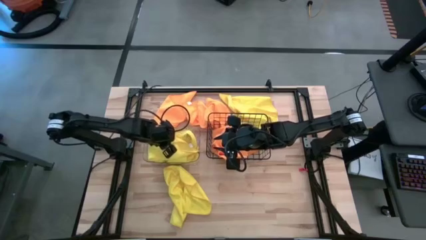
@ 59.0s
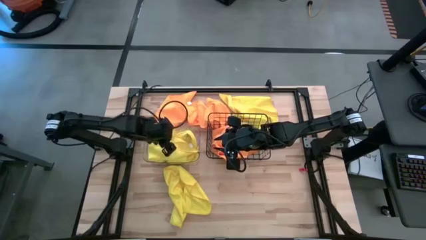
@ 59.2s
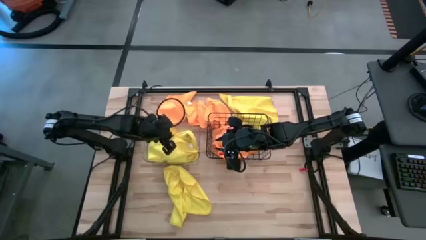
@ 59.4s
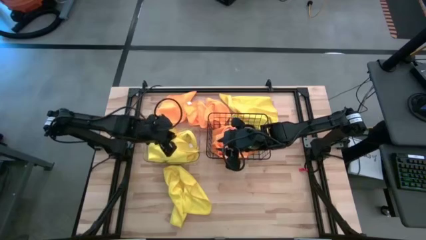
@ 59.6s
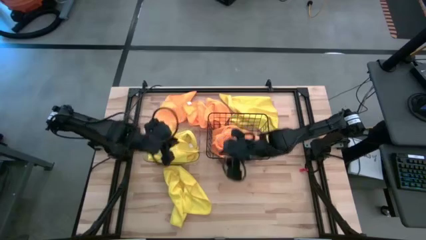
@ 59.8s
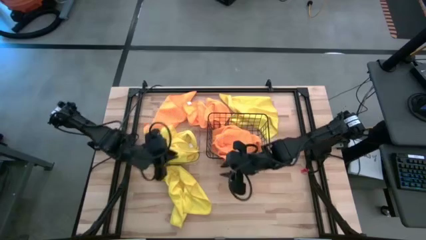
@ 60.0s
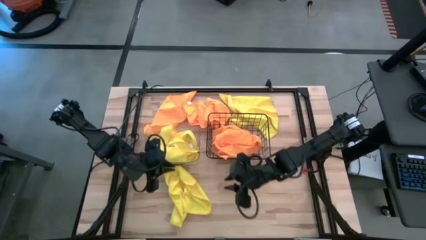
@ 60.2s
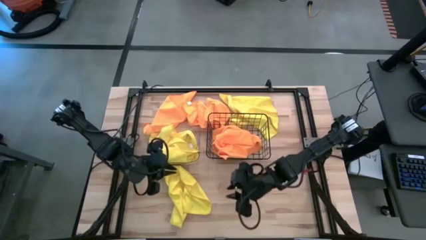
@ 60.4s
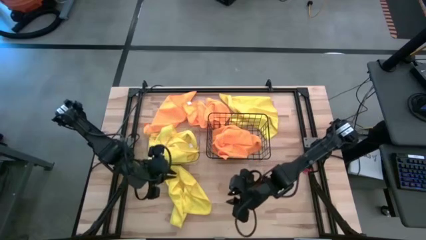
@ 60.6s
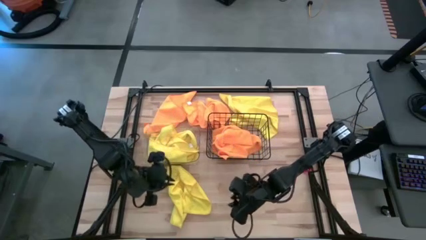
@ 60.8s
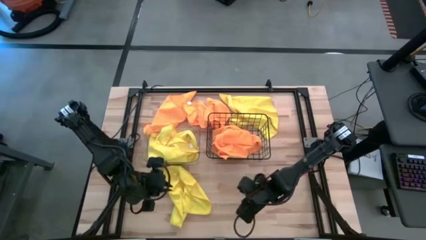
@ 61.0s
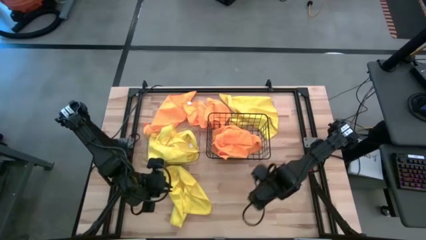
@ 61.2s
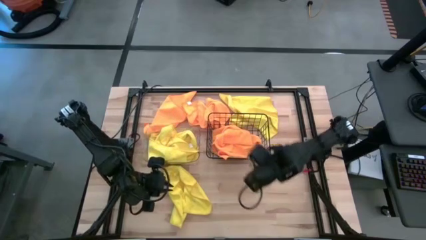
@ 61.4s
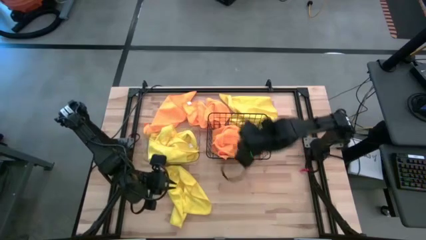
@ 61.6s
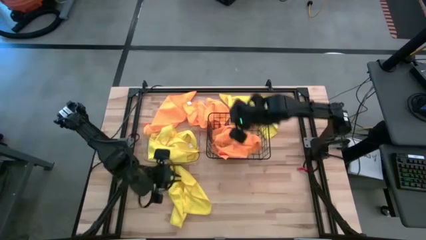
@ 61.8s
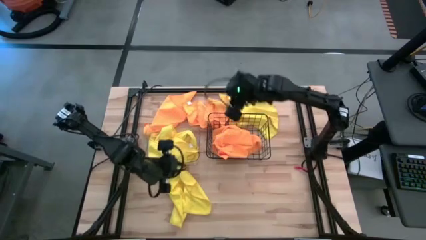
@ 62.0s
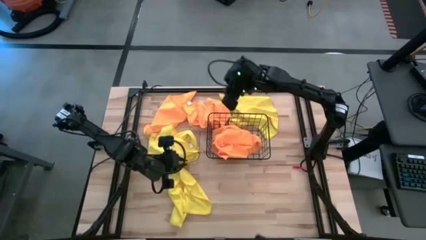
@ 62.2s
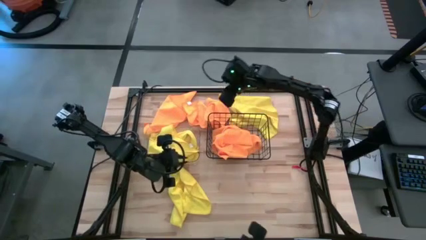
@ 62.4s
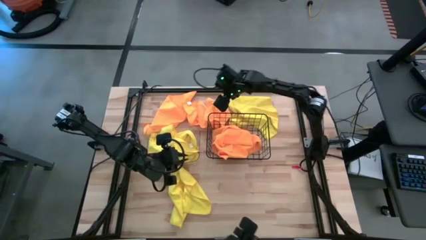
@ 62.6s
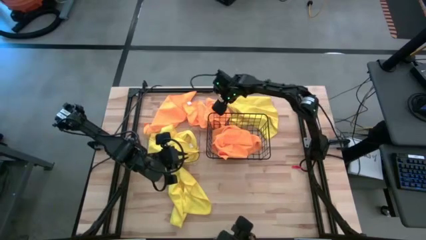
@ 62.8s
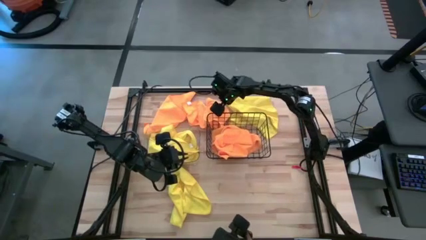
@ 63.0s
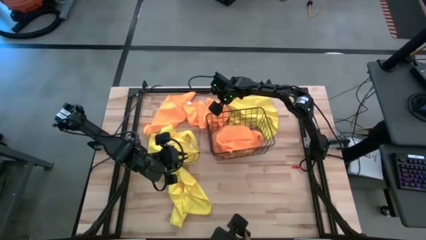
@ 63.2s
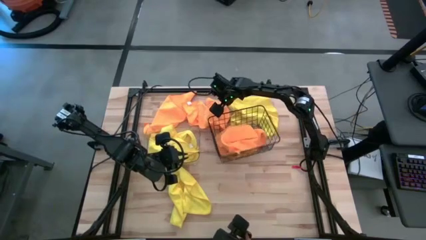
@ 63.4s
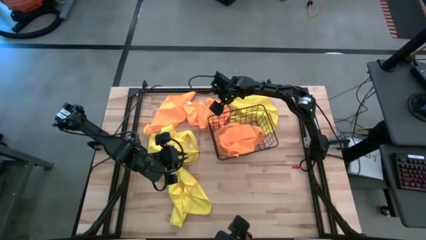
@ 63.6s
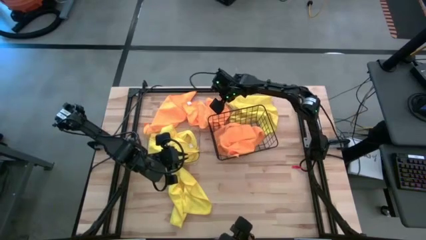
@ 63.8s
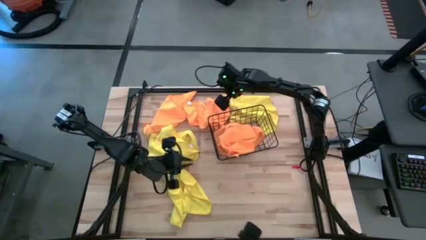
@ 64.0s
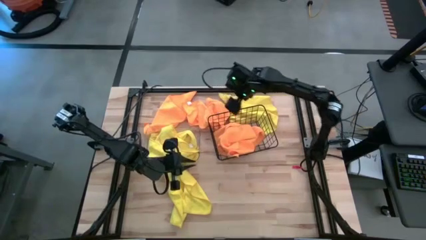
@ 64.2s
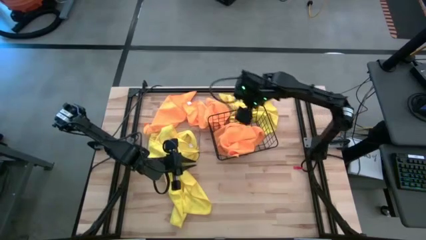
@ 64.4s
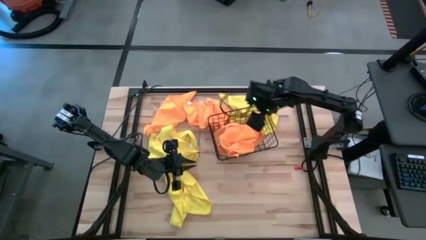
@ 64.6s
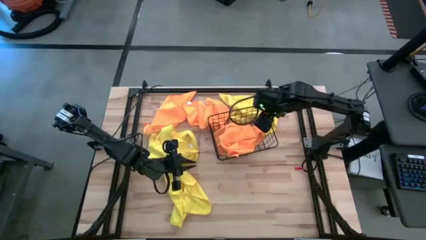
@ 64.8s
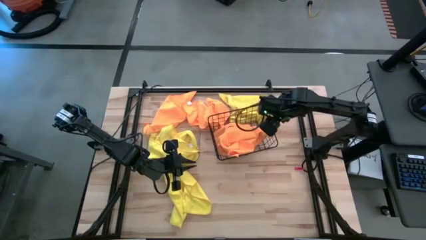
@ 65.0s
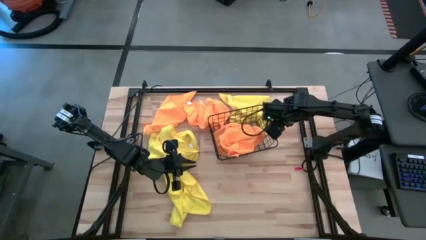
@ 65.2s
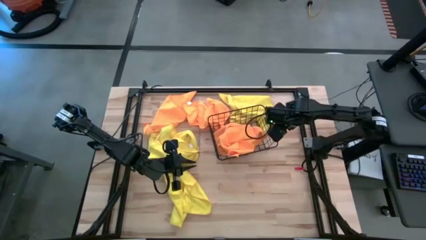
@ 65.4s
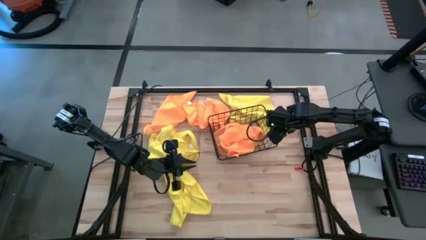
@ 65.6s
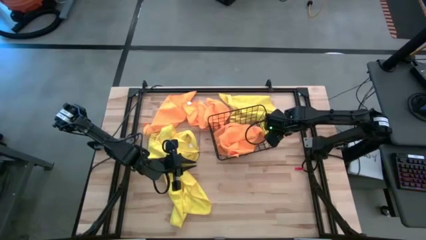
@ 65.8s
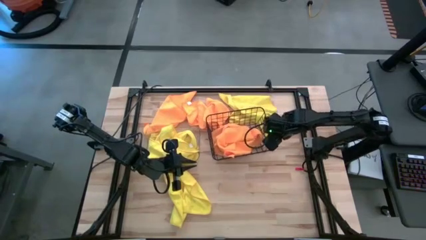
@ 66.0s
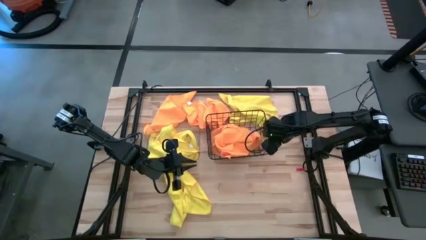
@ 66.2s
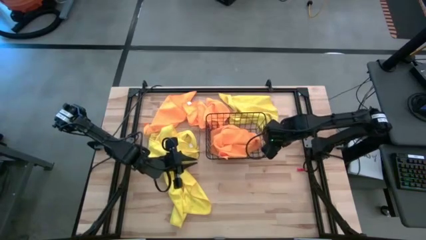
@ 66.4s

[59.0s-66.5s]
Task: Sort microfiber towel by color & place in baskets
Adjust the black wire basket

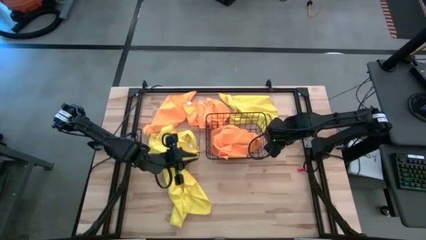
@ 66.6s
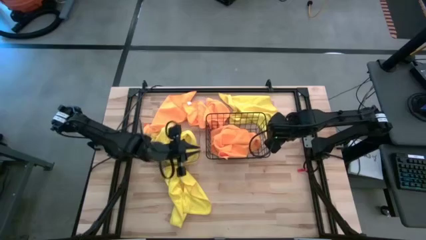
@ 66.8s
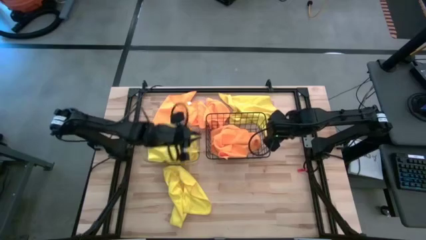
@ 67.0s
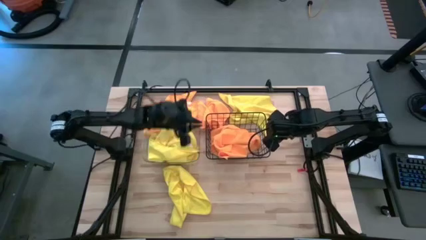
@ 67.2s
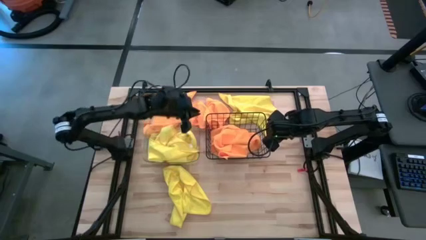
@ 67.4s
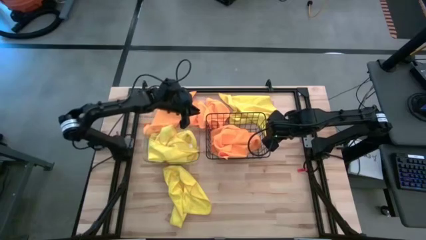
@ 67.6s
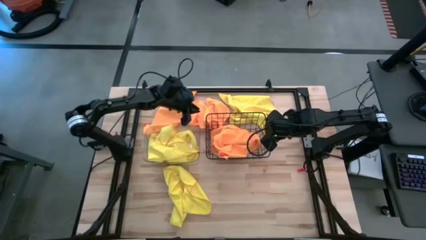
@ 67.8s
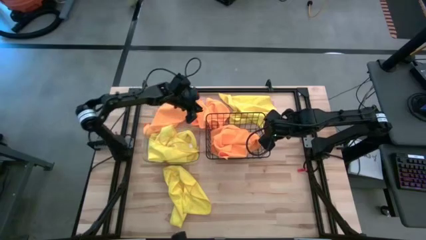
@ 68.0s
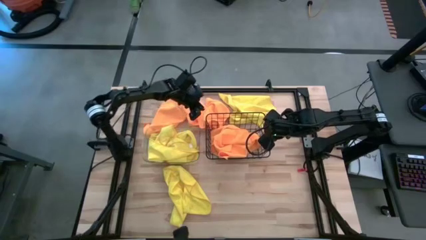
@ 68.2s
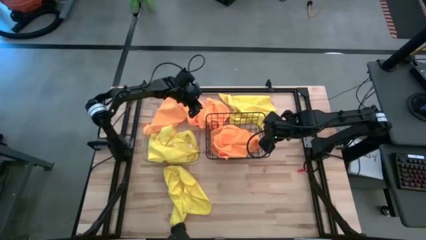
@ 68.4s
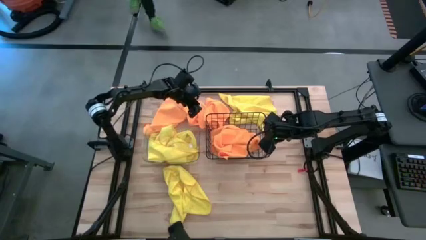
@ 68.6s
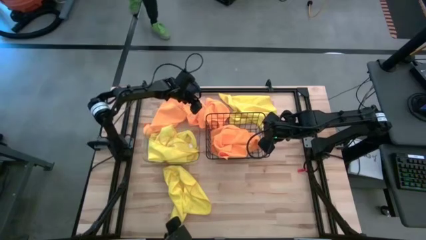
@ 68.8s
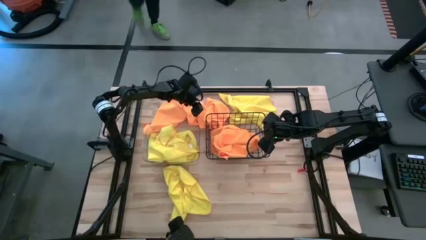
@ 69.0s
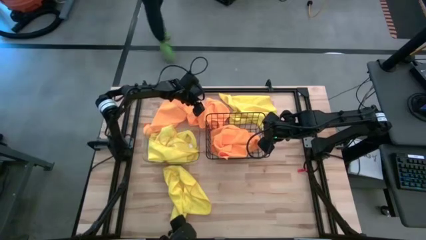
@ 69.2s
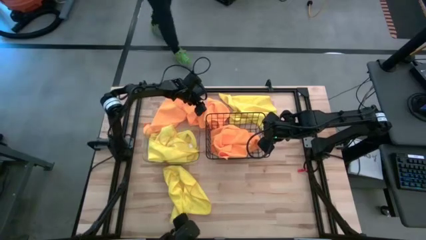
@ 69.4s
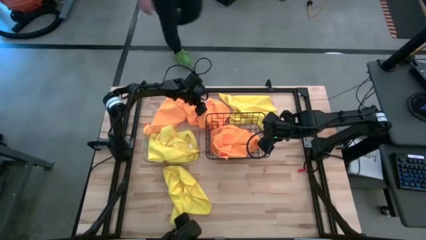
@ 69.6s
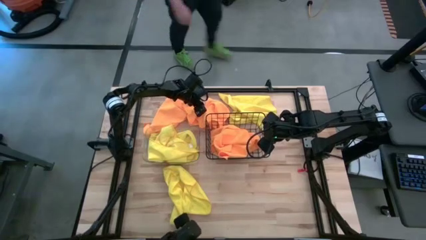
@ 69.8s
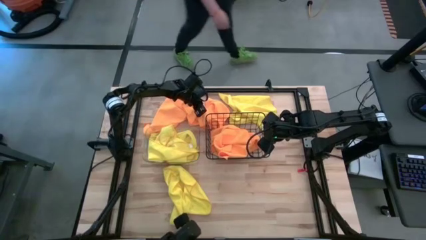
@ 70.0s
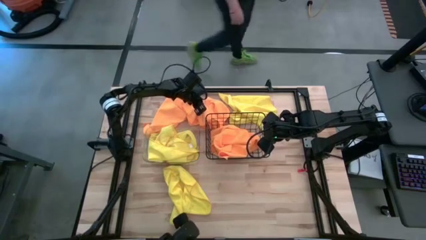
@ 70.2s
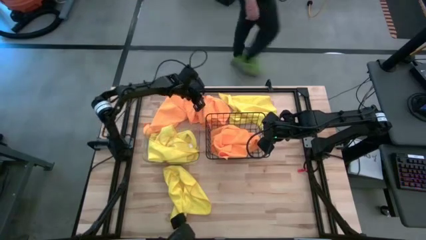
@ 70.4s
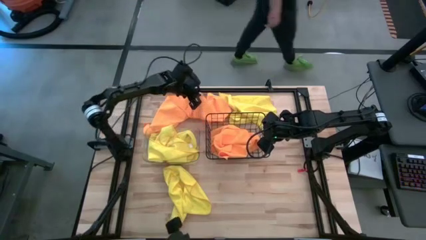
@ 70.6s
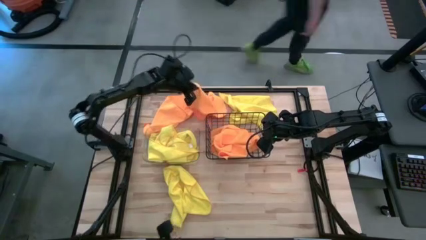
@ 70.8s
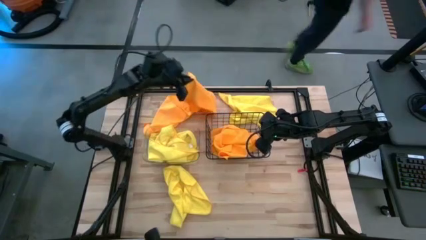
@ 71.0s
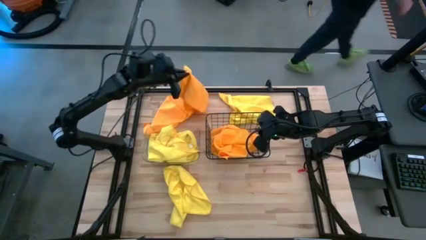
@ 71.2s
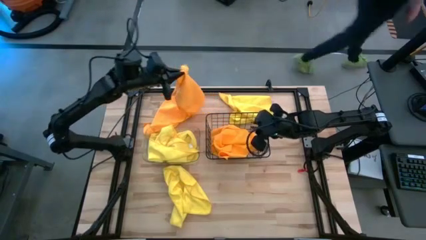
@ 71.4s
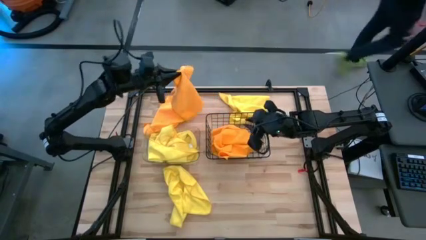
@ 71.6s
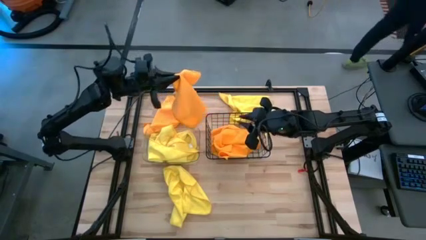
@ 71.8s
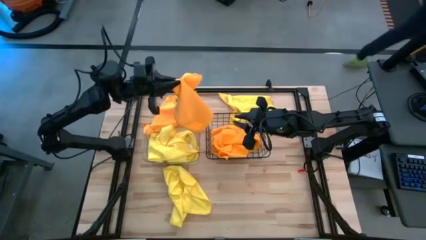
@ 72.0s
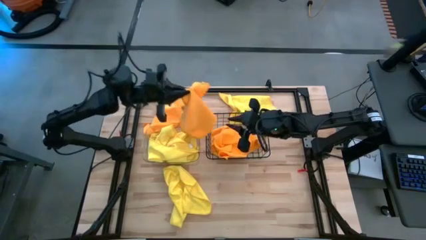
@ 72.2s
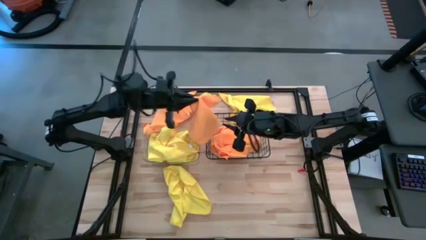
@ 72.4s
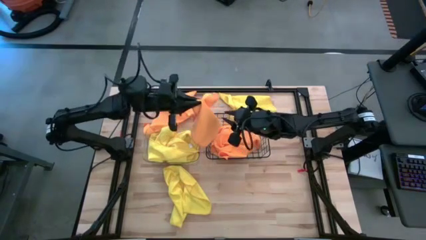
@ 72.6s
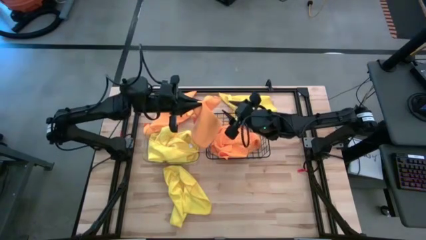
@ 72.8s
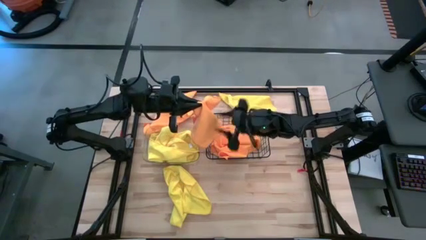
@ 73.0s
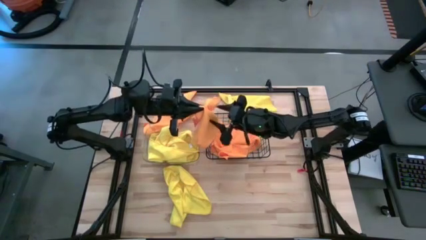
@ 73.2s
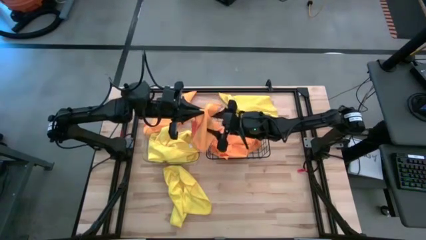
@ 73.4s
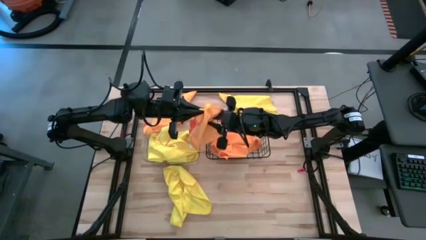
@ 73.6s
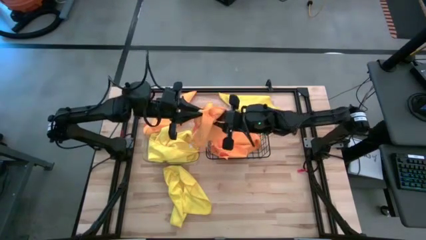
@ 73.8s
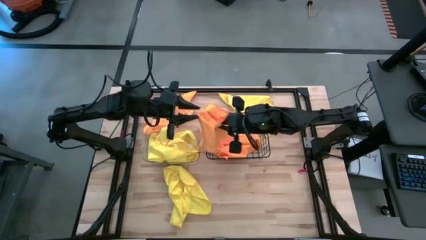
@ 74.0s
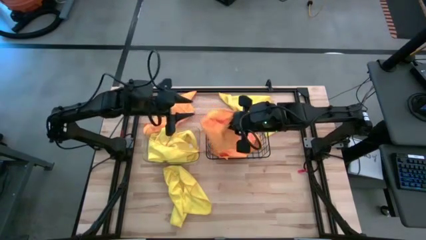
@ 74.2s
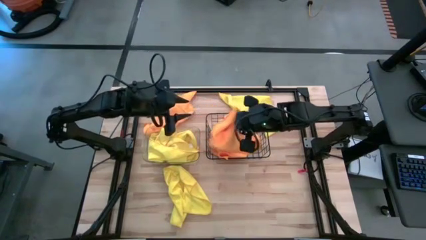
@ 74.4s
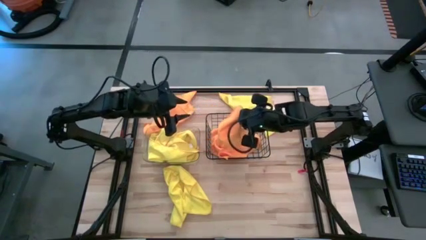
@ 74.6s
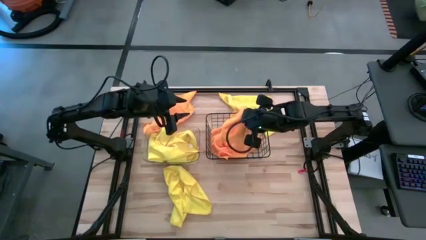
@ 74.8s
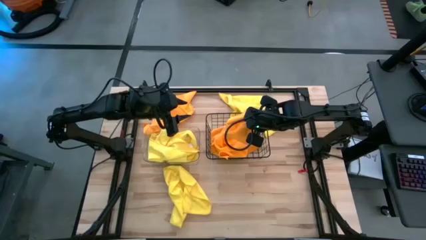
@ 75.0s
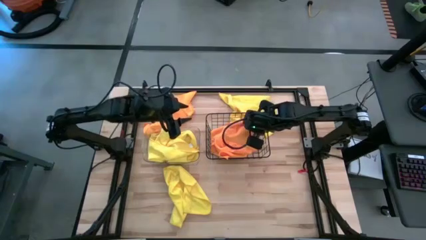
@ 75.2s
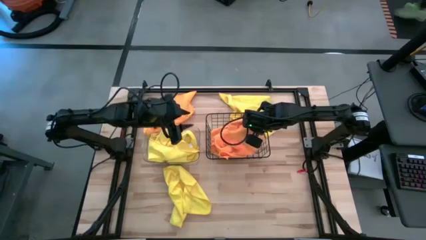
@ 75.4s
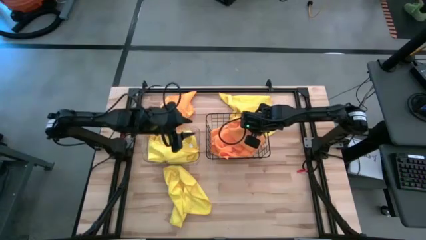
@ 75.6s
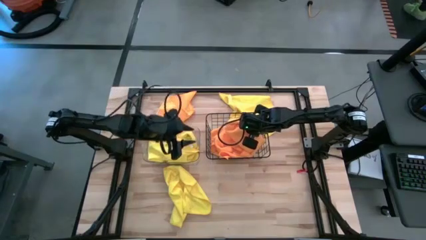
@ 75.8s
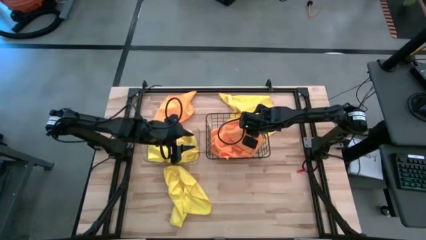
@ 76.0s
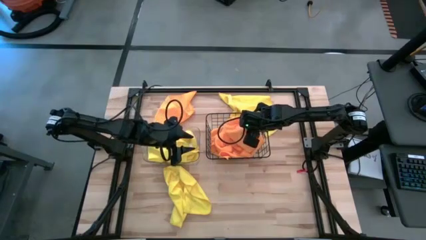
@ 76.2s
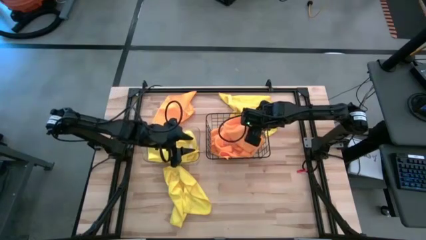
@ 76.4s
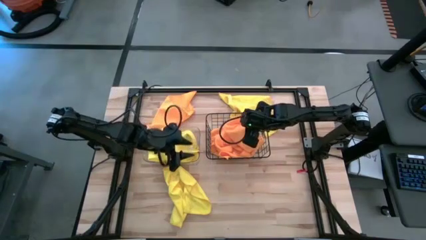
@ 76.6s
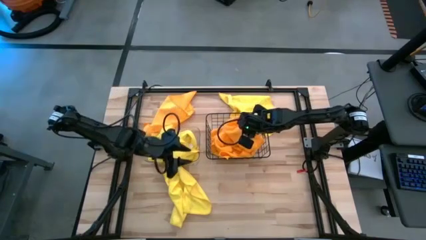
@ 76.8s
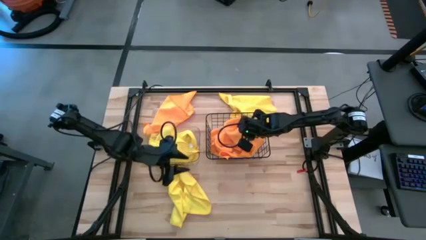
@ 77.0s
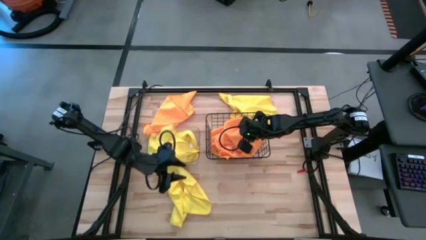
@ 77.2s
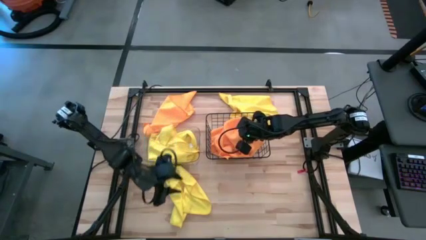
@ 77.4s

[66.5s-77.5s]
Put the orange towel into the black wire basket
